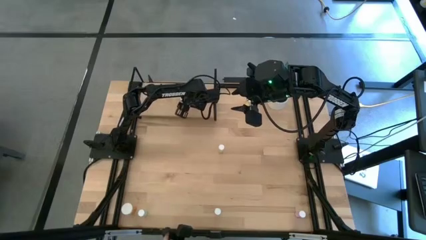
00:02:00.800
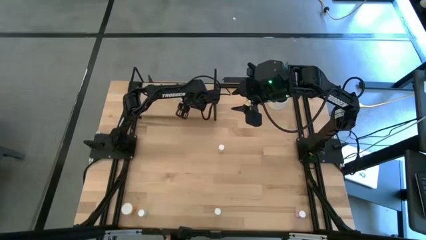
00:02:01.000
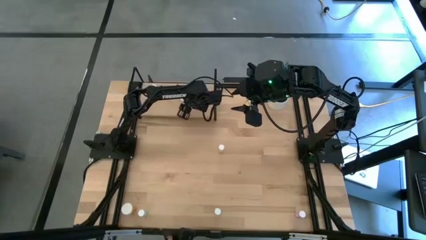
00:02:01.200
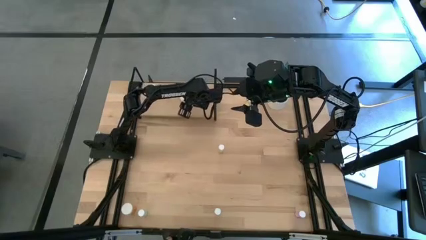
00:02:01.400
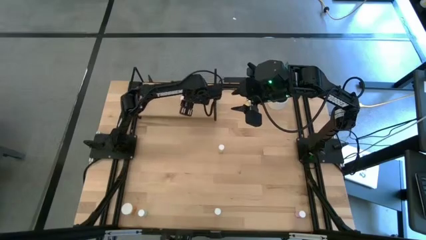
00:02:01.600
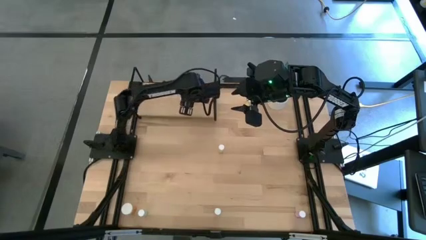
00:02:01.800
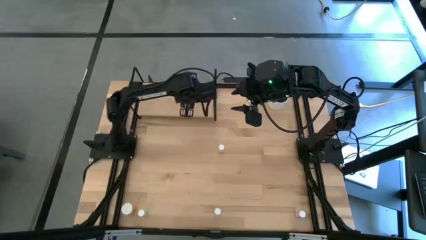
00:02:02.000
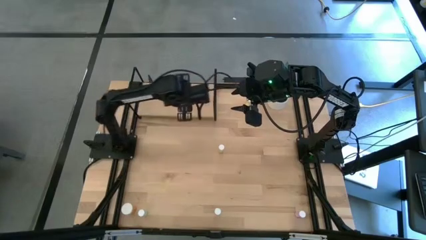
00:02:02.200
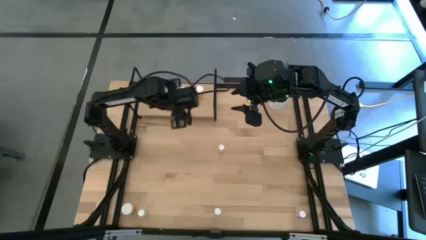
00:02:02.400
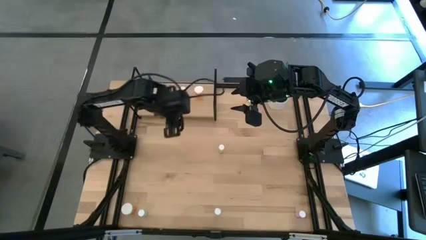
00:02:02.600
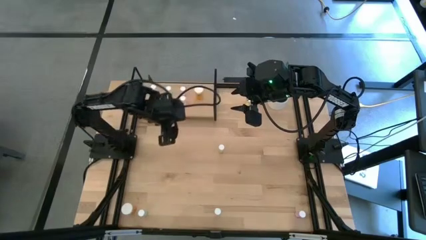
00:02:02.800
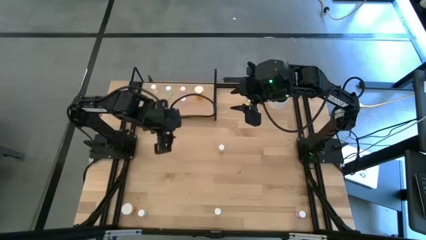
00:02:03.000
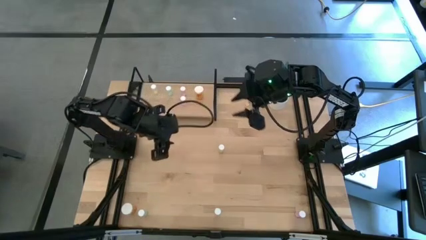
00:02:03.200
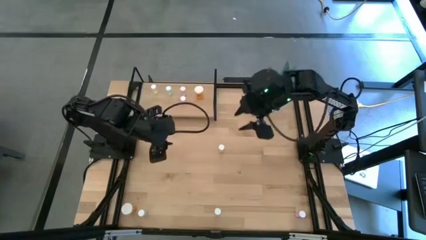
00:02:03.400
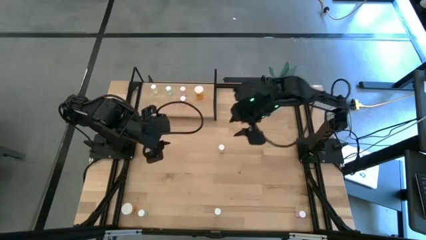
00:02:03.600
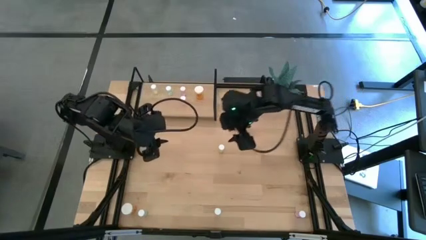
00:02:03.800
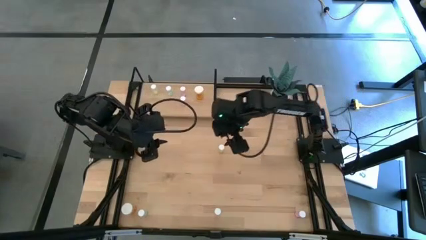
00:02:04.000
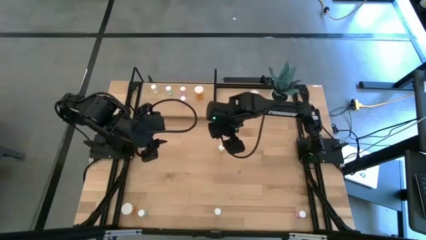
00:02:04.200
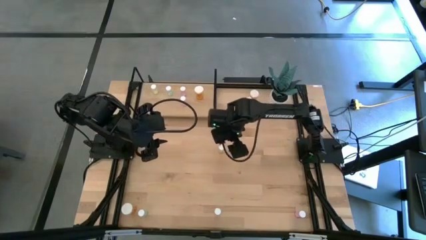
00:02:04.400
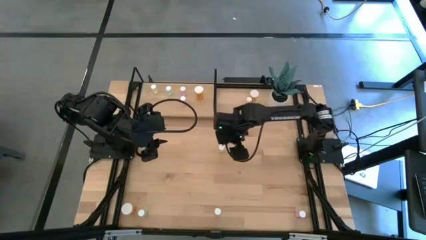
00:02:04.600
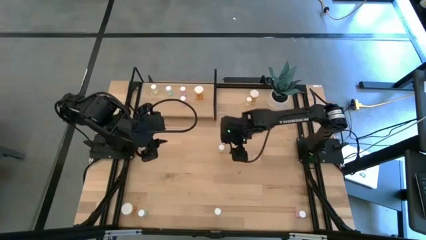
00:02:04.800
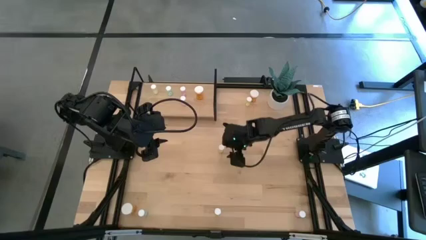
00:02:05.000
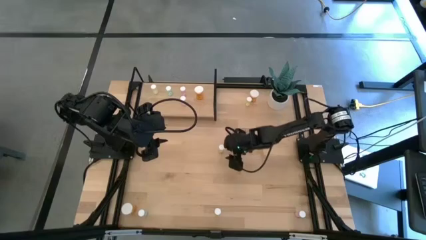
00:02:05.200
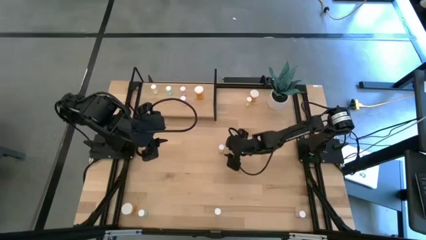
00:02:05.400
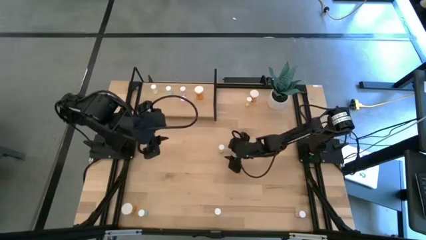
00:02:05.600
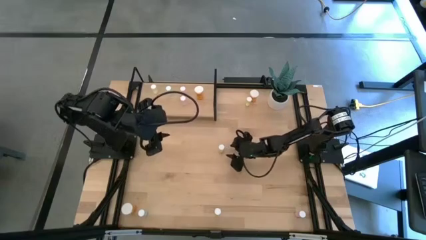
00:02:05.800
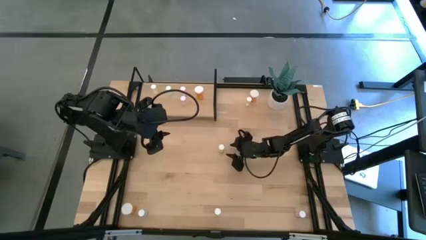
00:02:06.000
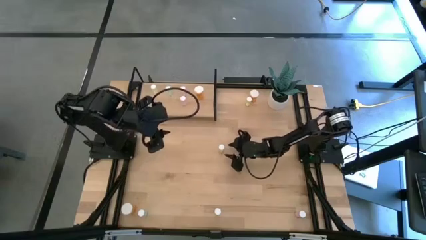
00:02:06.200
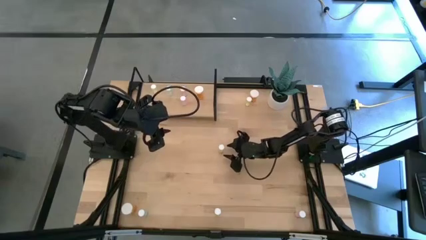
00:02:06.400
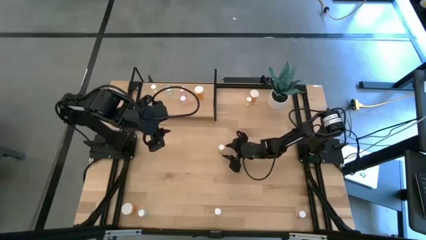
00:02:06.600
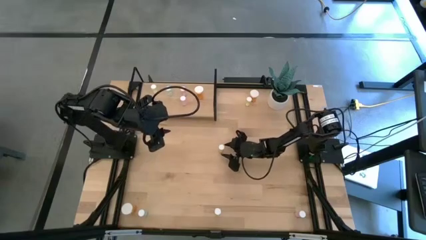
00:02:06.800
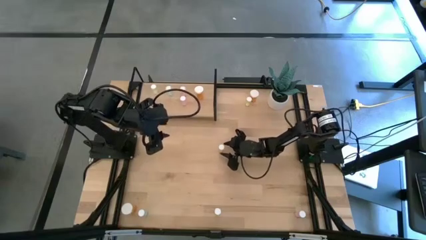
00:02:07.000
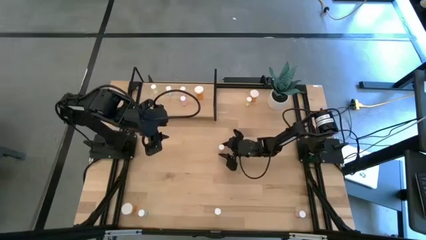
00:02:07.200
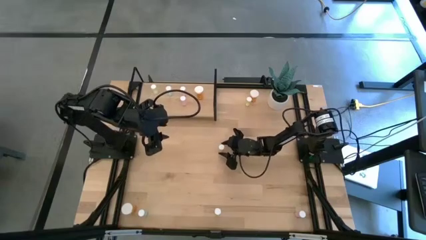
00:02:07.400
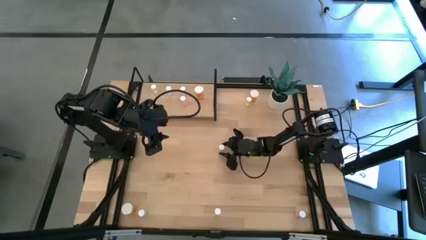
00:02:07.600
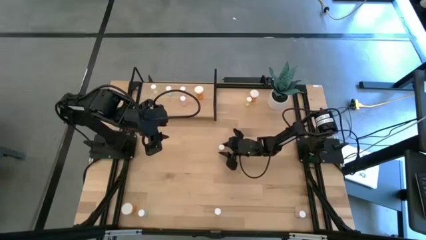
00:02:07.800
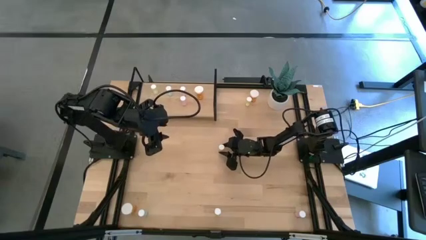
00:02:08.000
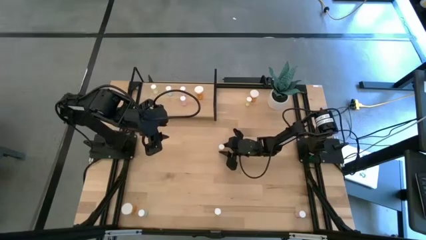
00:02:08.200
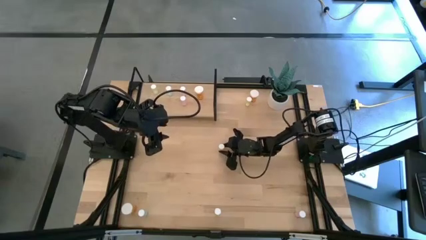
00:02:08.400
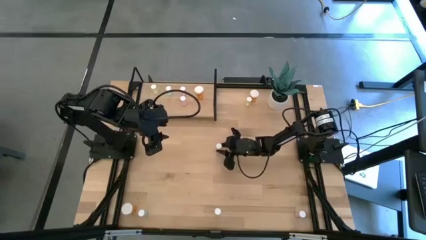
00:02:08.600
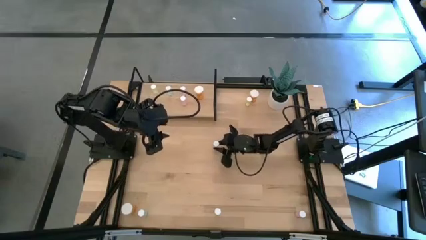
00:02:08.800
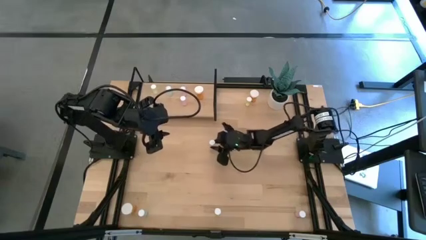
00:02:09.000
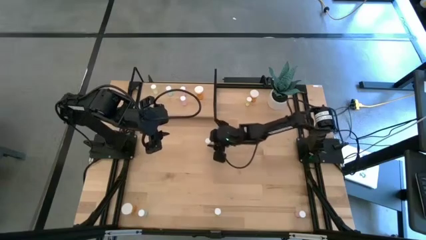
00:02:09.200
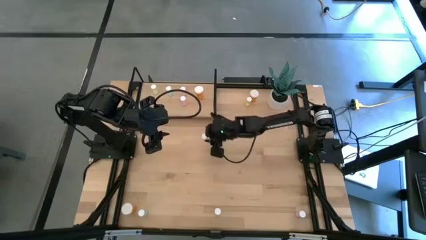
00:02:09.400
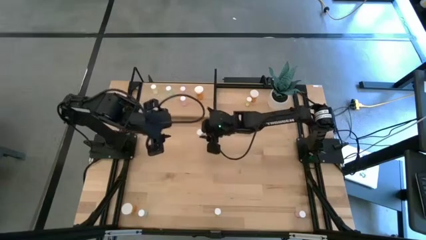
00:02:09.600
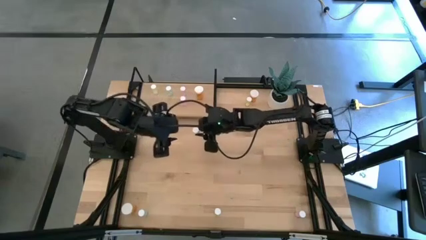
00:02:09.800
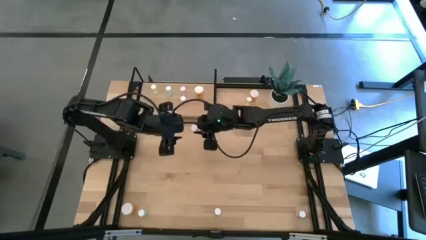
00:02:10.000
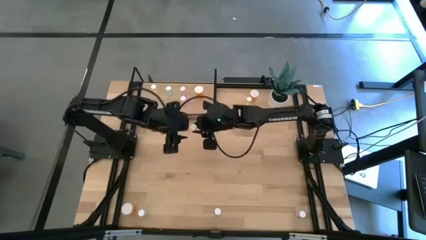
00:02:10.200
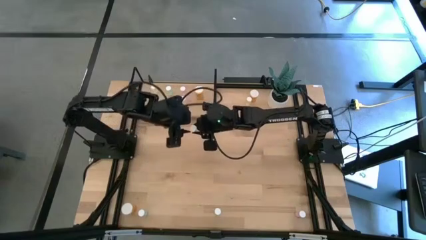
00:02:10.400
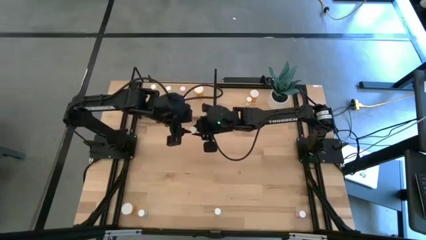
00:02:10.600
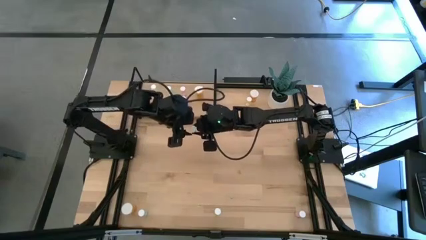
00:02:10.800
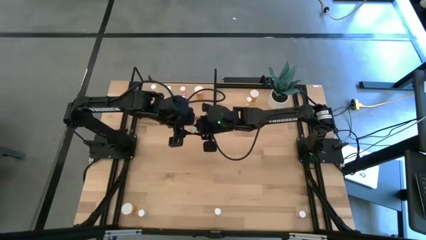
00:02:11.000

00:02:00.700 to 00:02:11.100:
Task: Pick and place medicine bottles onto shelf by color
Put the bottom yellow pill bottle on the shelf and align it with the other yellow pill bottle

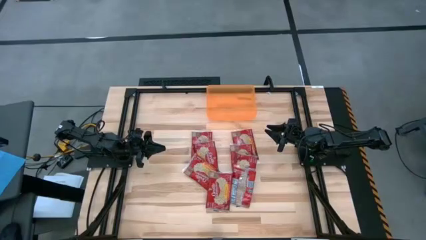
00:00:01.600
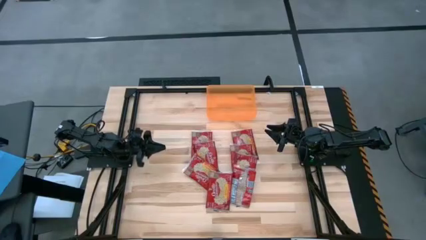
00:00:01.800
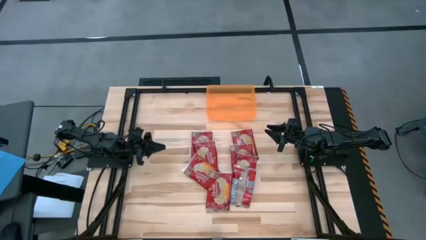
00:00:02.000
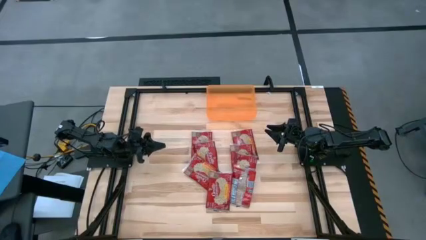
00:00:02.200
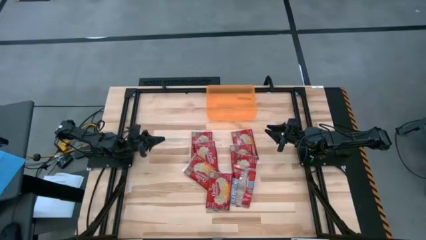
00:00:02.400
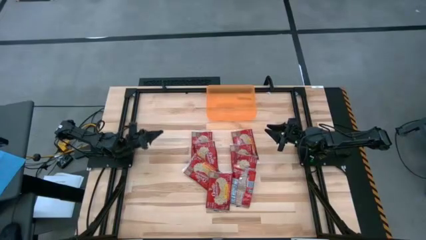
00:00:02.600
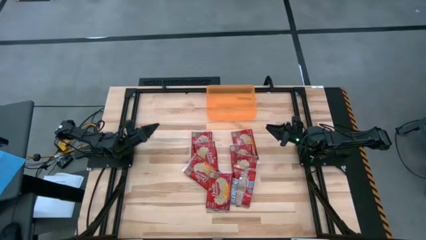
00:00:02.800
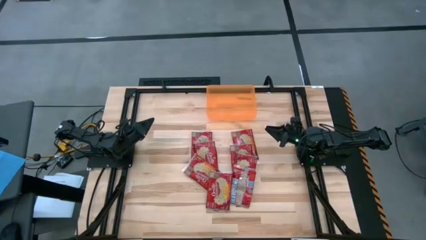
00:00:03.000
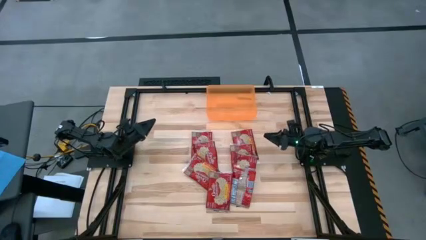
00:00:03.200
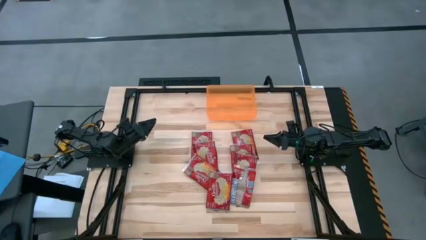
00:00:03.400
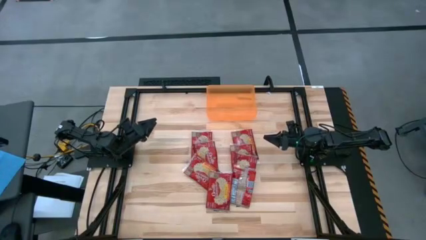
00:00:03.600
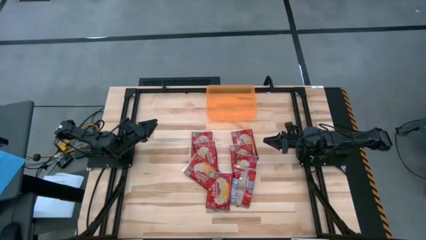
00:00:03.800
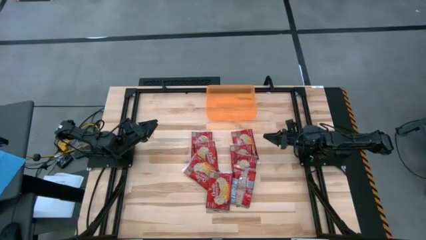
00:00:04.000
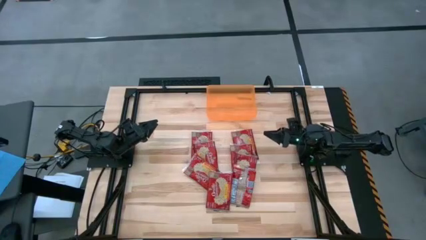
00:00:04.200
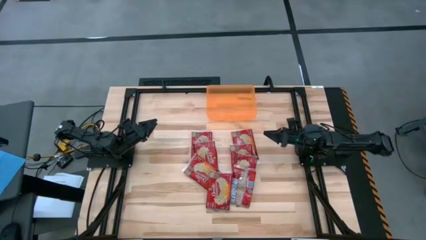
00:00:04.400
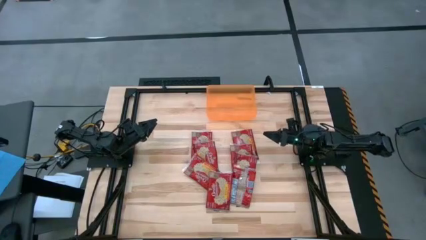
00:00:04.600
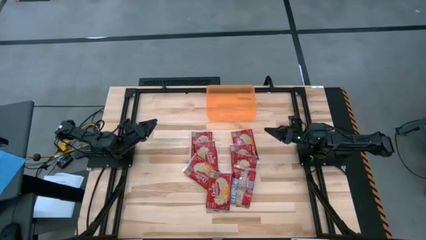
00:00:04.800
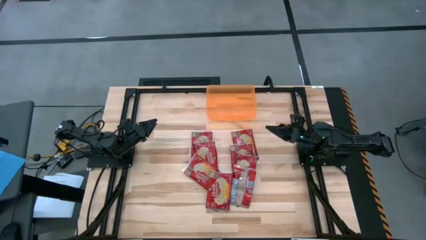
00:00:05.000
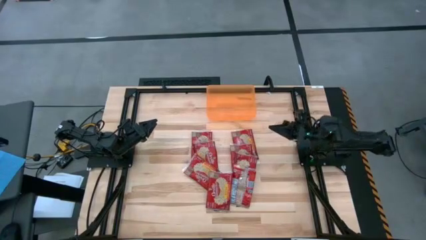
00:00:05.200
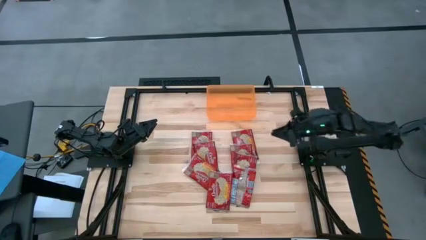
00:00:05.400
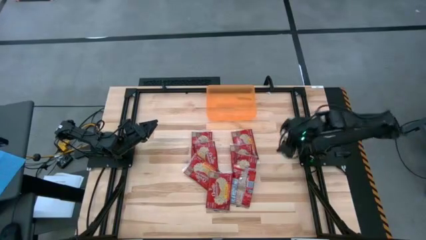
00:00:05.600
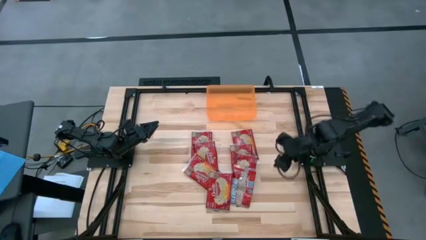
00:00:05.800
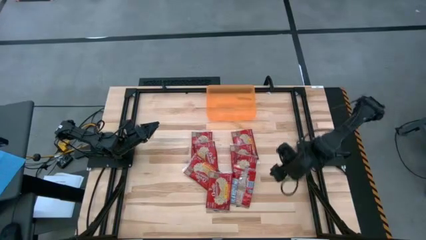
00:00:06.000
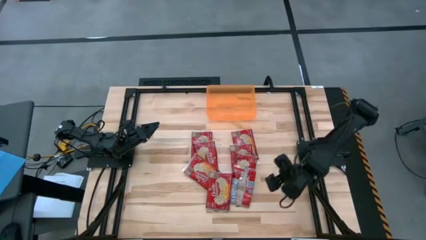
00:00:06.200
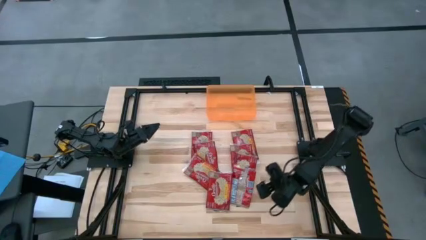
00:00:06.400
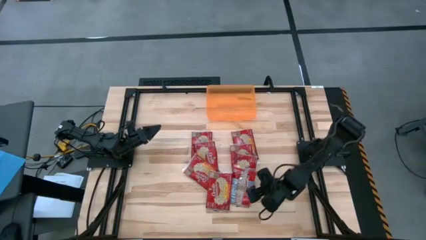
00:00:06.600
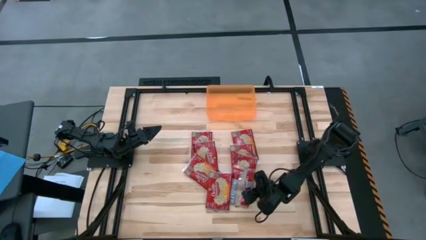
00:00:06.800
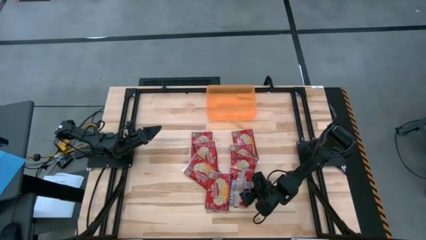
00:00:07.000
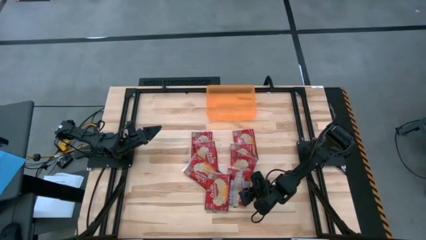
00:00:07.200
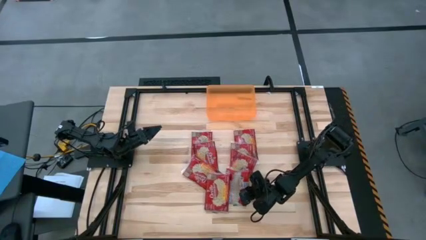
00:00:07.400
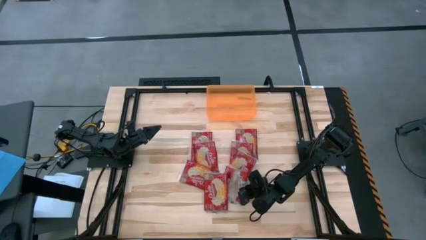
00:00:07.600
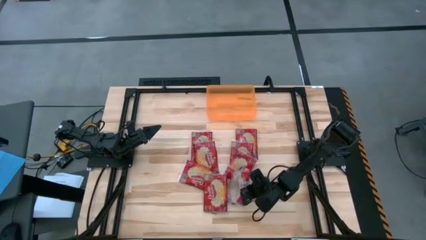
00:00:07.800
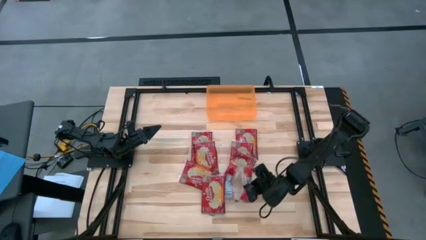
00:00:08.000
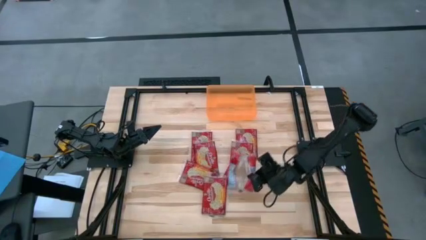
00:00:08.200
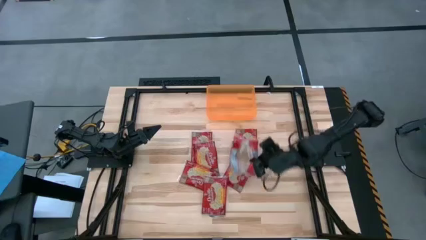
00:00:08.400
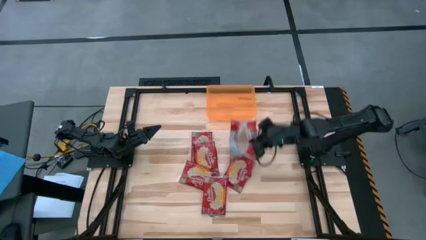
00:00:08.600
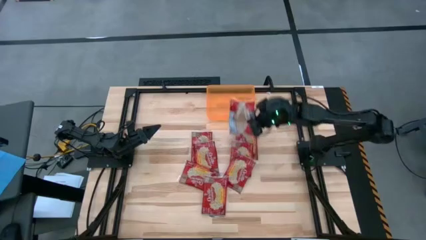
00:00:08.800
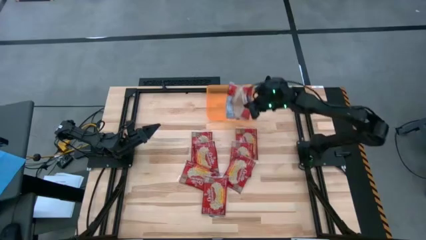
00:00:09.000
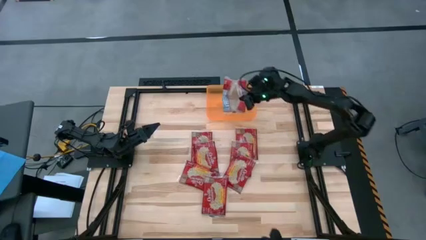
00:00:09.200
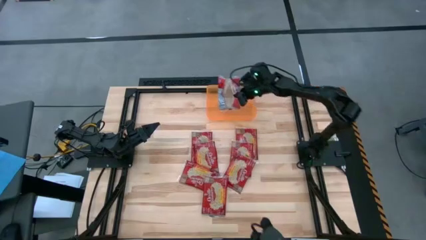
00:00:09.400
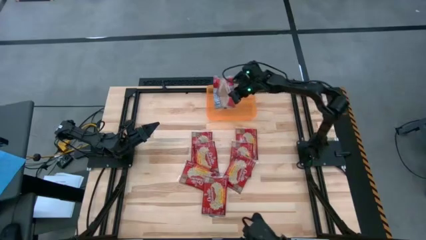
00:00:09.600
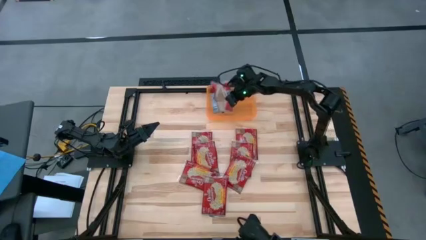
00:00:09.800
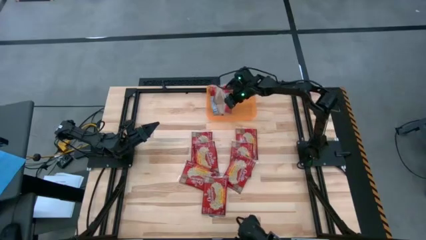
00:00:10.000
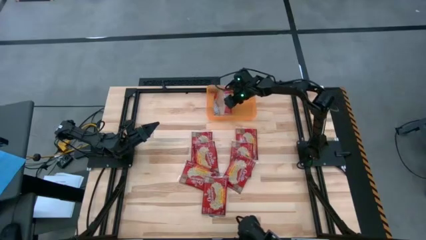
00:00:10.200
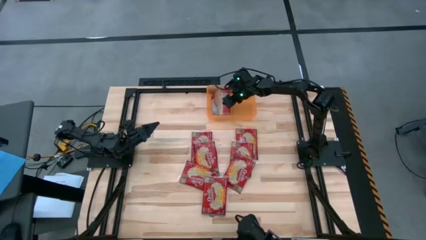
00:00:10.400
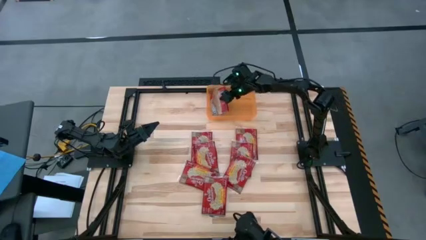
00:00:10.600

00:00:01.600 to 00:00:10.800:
Task: Sort popcorn bags into baskets
Put the red popcorn bag into the orange bin
